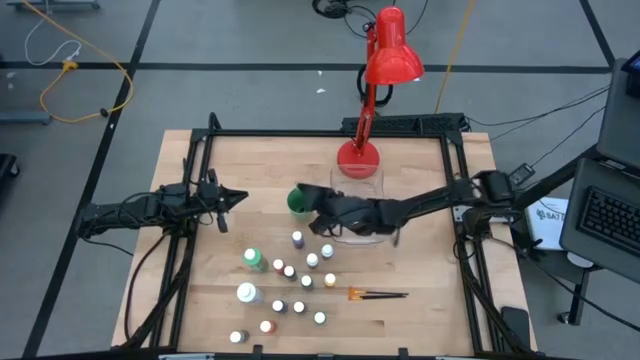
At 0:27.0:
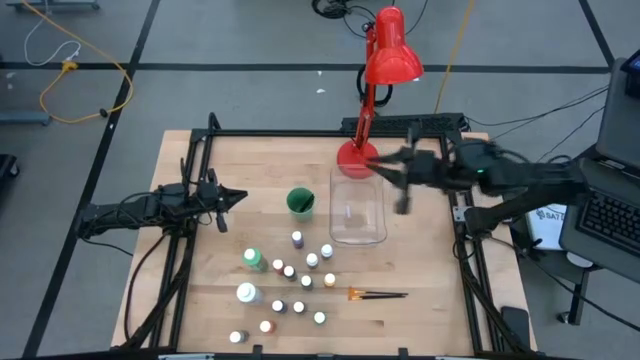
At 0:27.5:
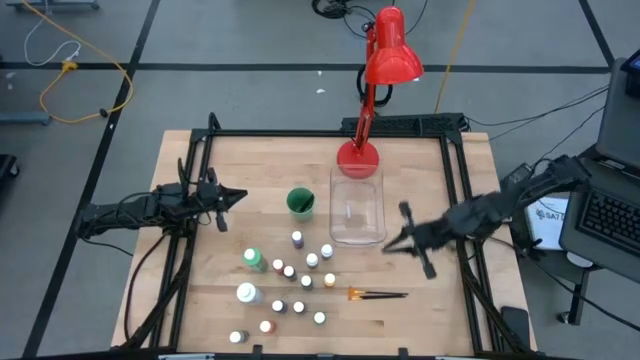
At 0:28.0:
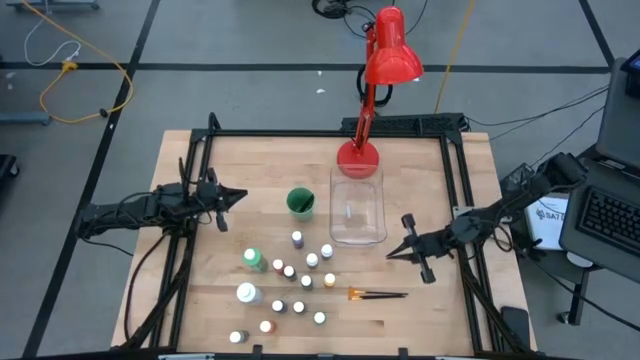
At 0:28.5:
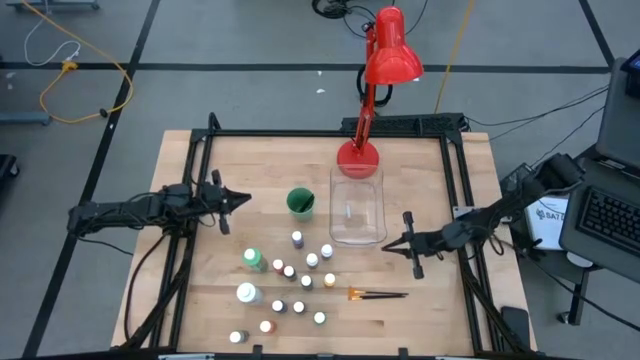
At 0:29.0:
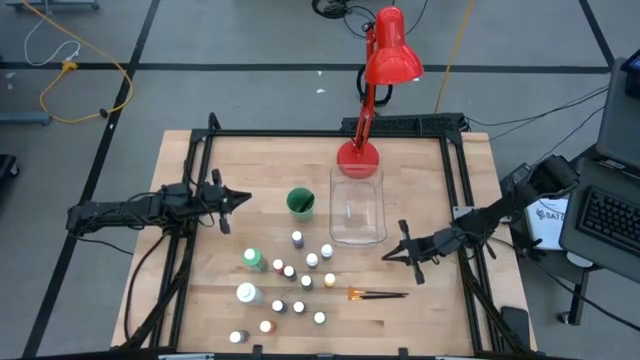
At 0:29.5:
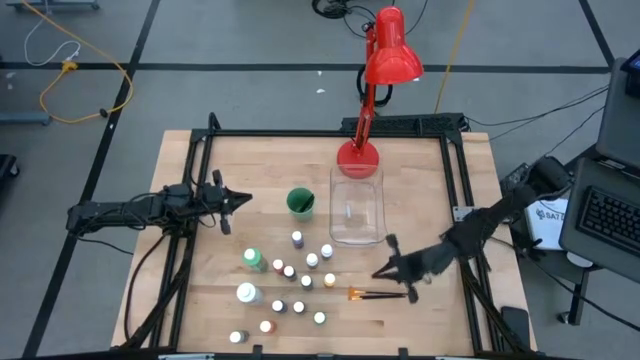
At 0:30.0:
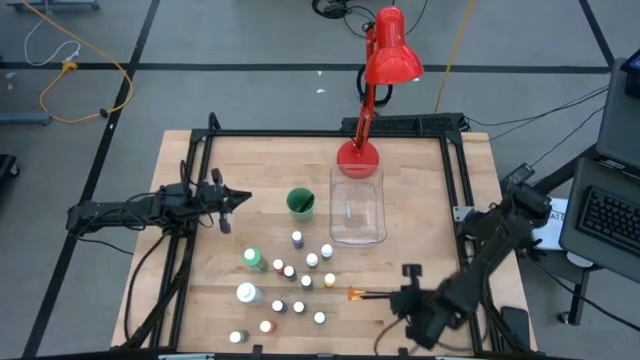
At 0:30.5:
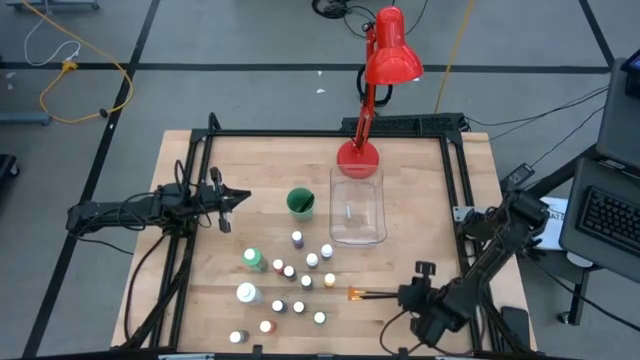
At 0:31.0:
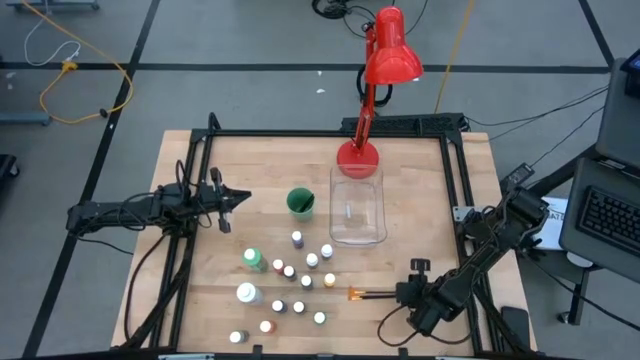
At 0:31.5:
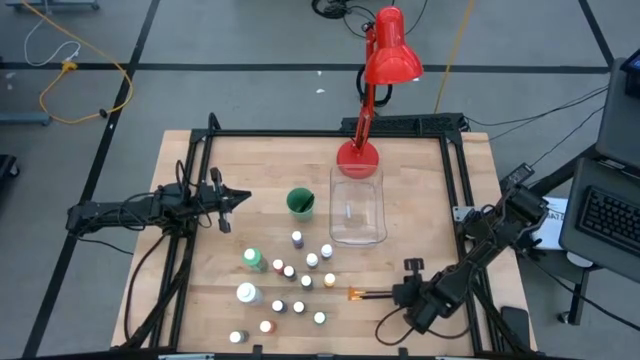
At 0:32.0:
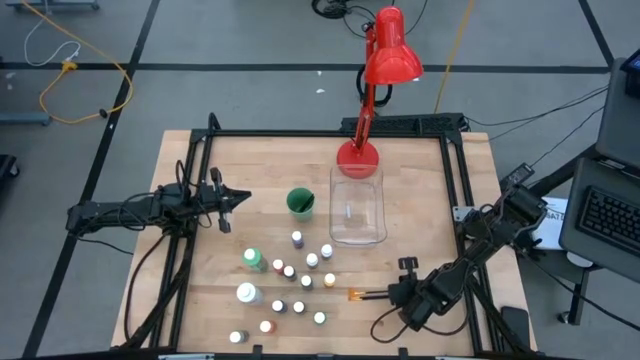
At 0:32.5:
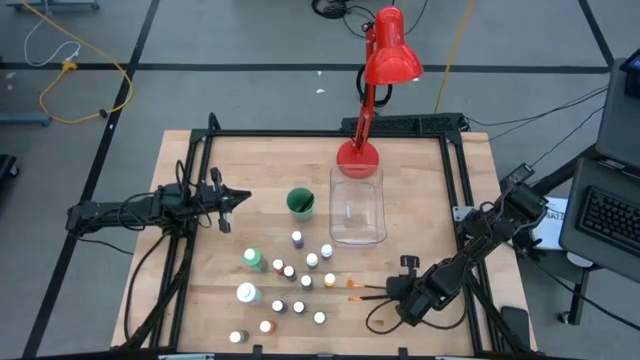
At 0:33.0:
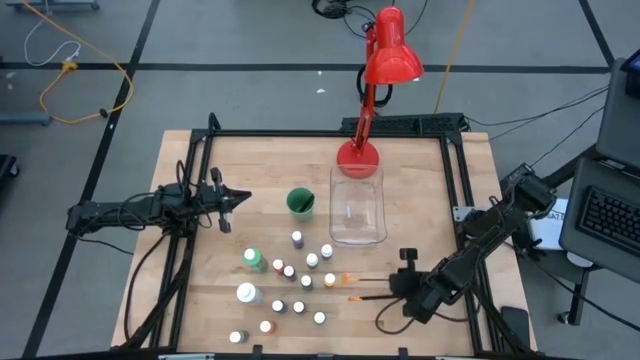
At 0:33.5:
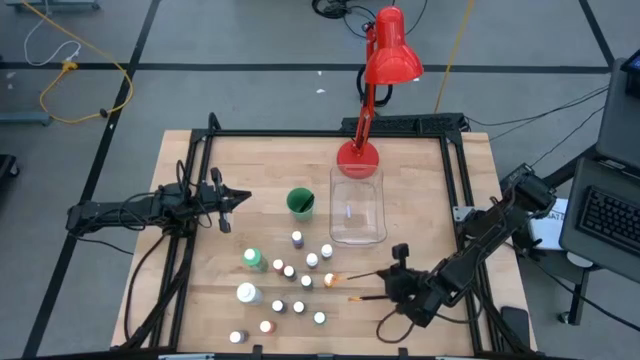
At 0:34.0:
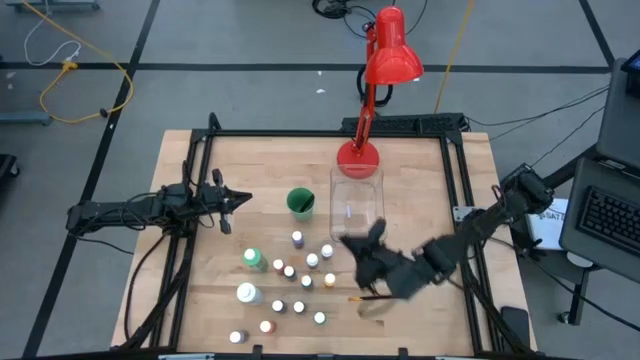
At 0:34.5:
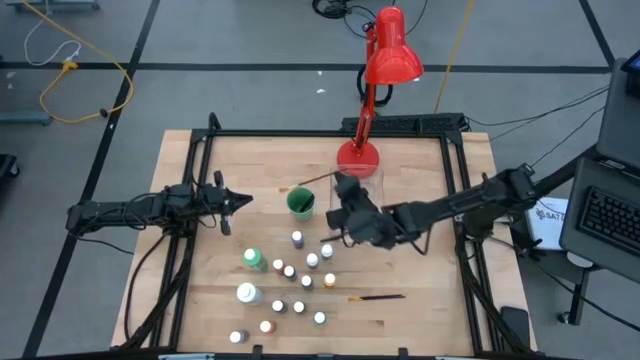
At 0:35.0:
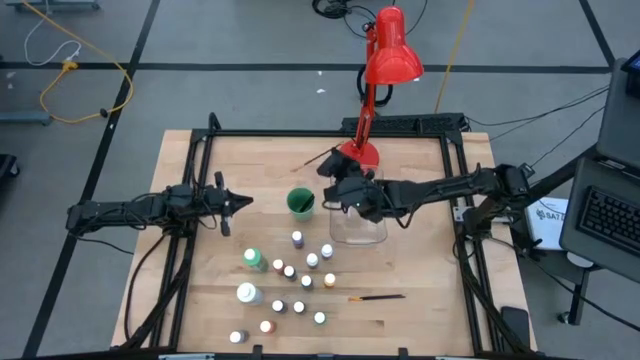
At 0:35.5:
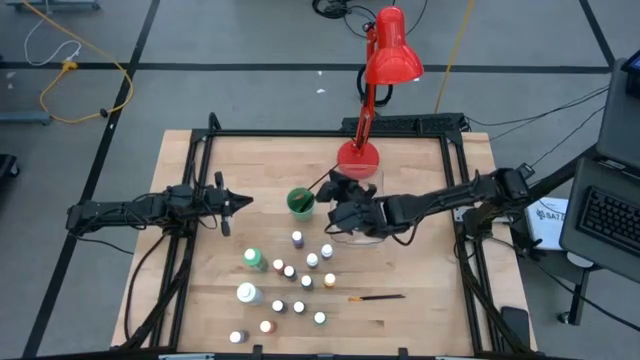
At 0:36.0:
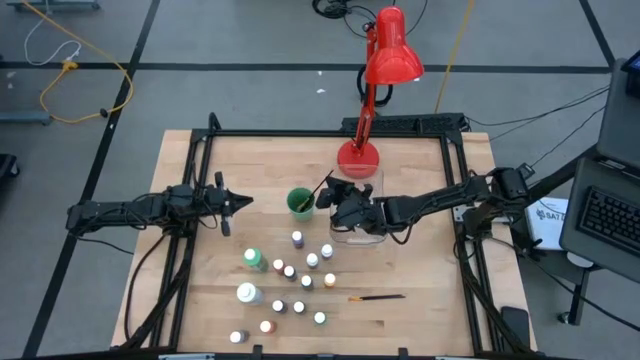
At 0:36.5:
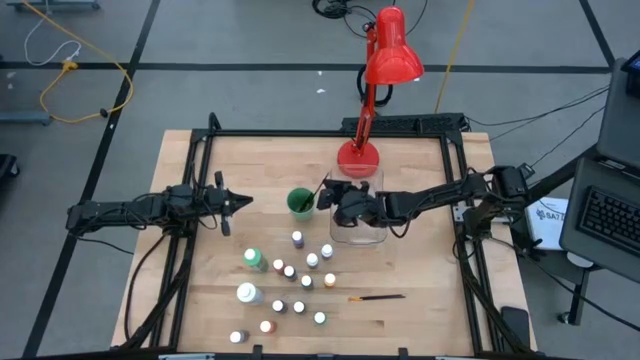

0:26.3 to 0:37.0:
Task: Pick & Place Paint Supplies
Put the top yellow paintbrush into the green cup

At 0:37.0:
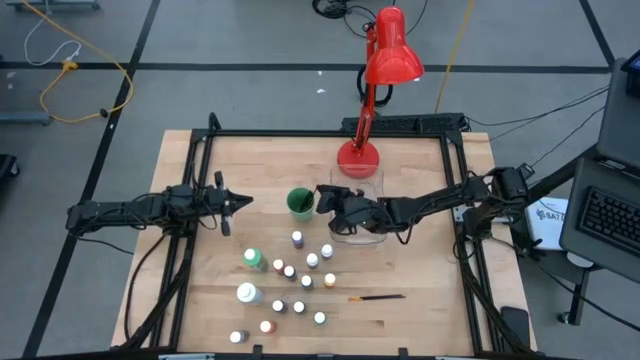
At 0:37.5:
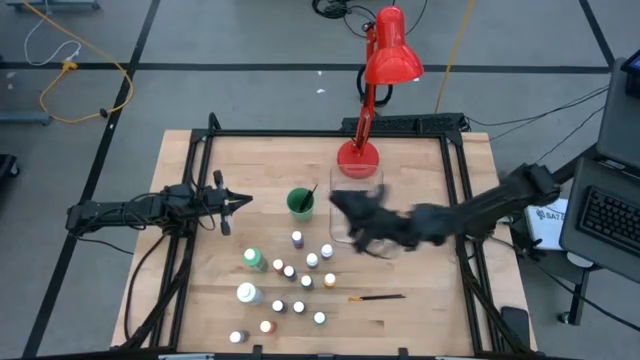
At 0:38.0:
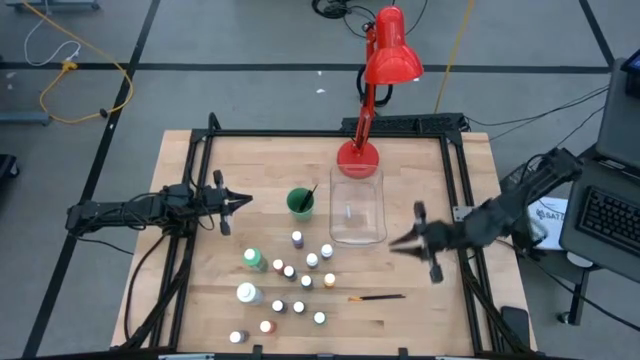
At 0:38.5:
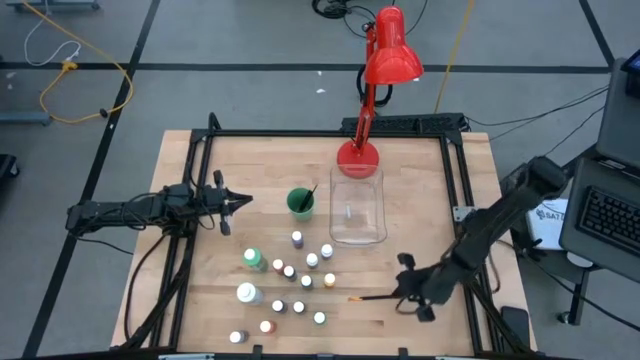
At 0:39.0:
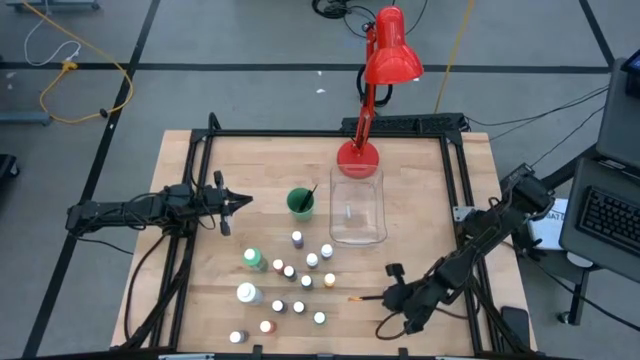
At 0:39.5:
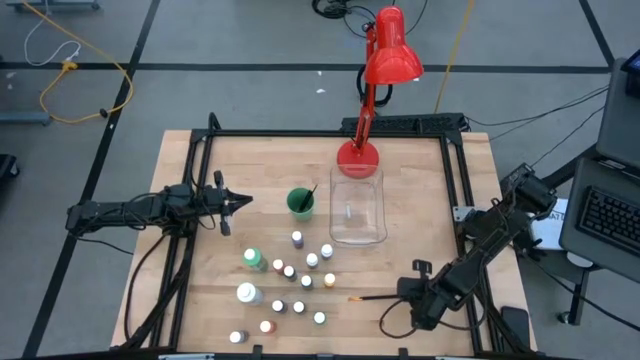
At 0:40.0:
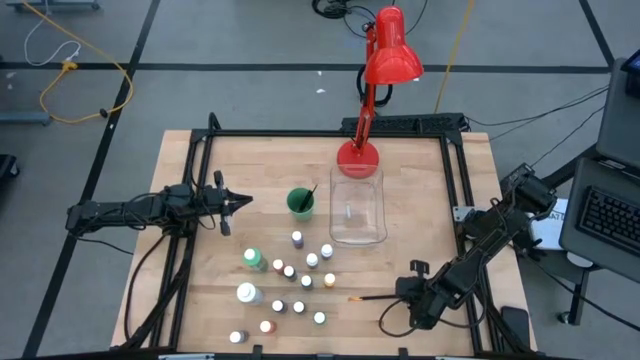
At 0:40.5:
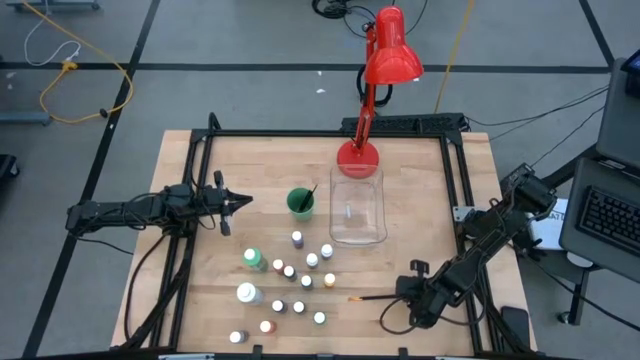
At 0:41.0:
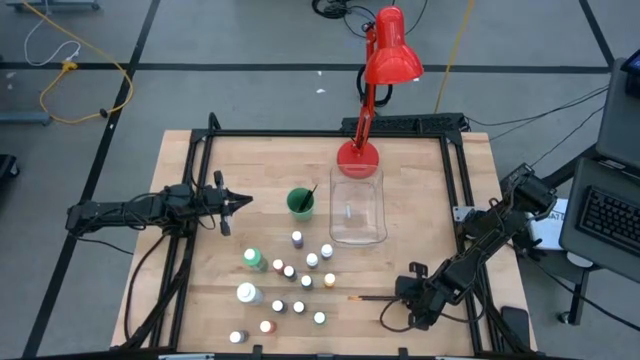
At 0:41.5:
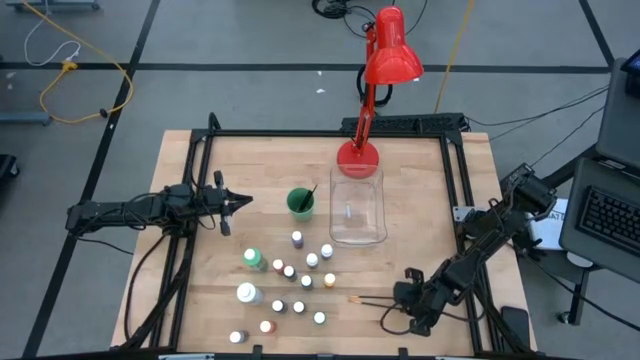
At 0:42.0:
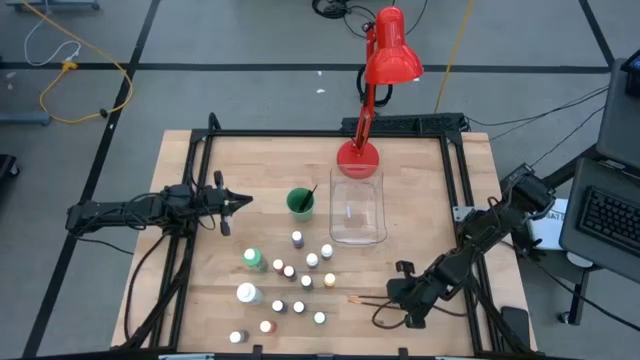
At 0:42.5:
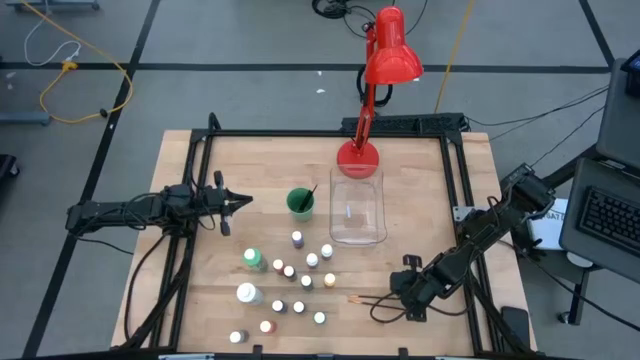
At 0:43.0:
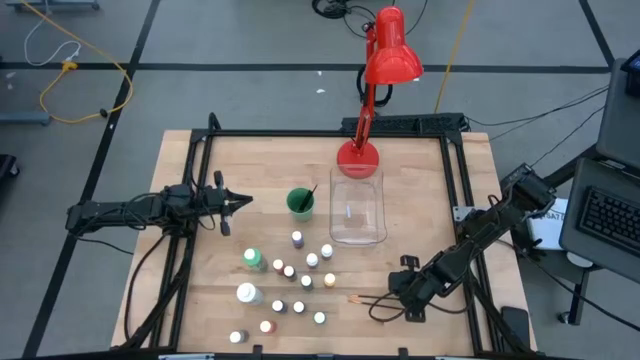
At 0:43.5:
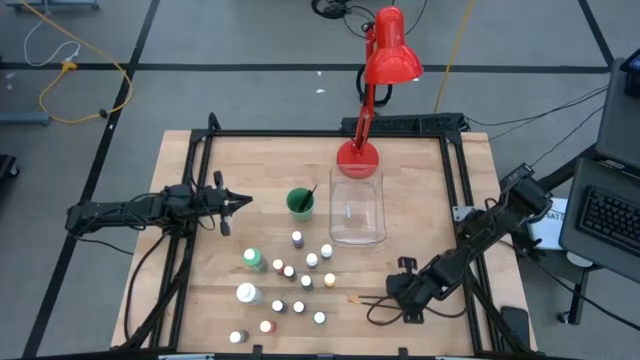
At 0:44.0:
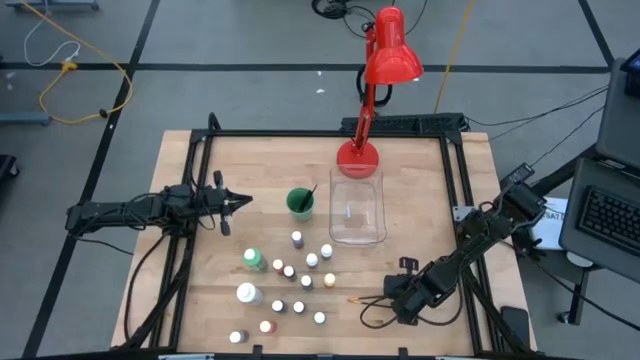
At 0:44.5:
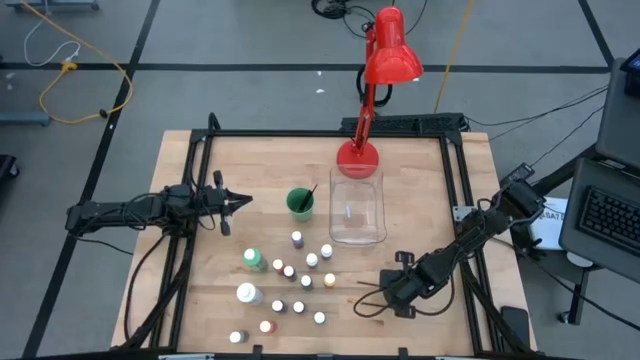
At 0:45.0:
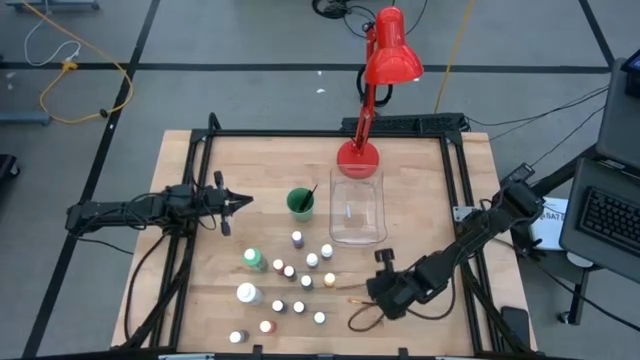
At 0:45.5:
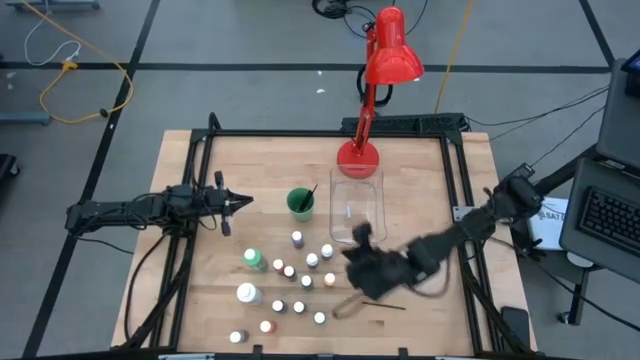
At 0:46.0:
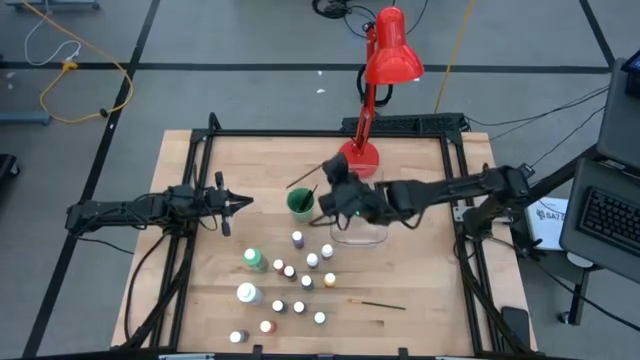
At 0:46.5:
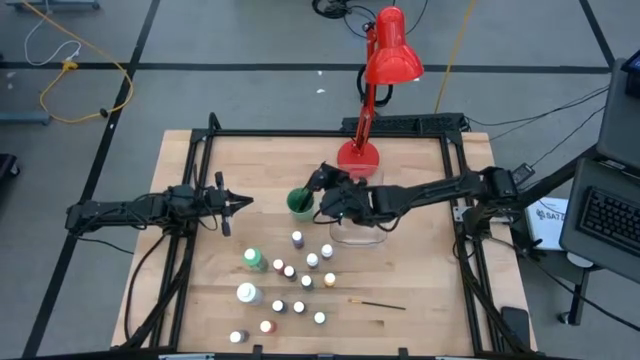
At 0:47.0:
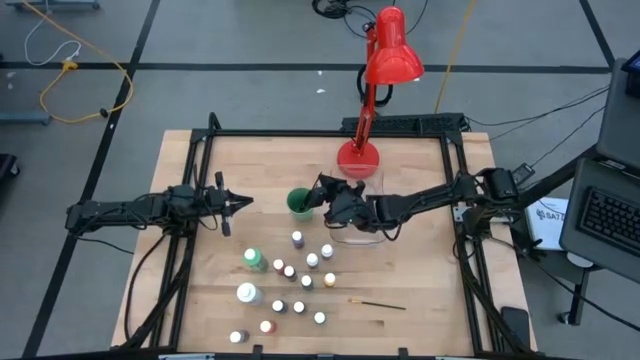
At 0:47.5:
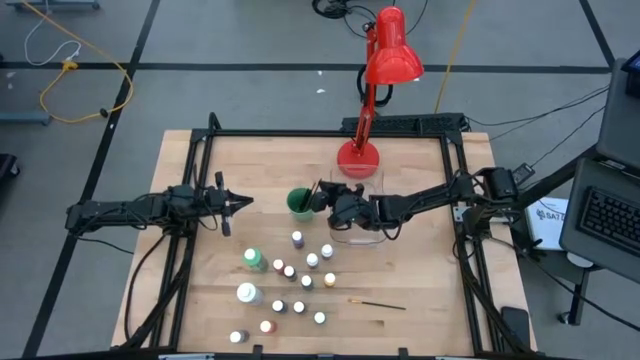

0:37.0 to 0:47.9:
Put the top yellow paintbrush into the green cup
